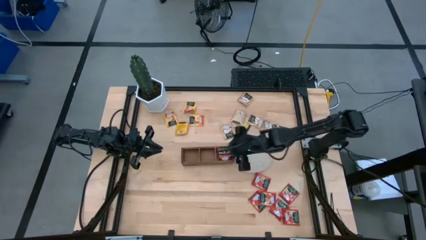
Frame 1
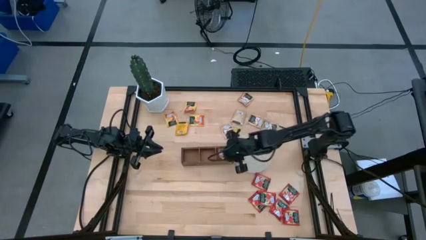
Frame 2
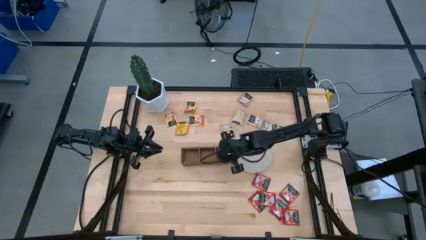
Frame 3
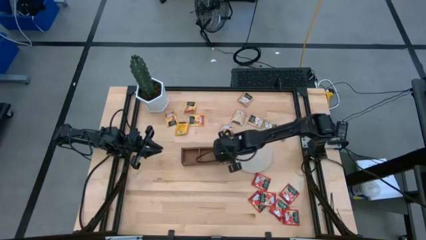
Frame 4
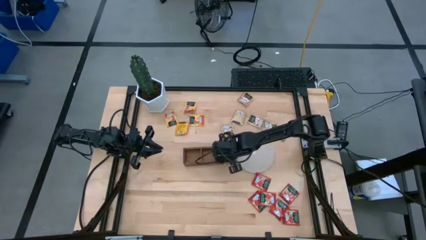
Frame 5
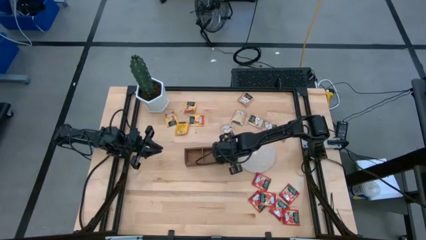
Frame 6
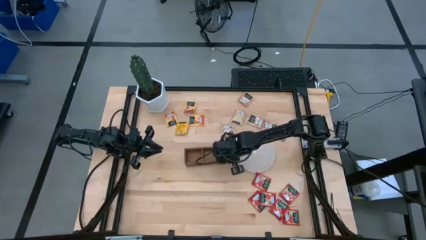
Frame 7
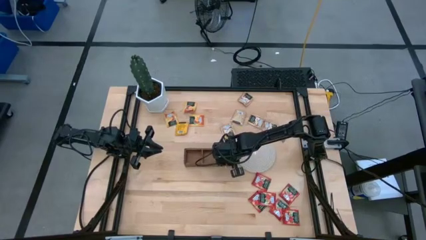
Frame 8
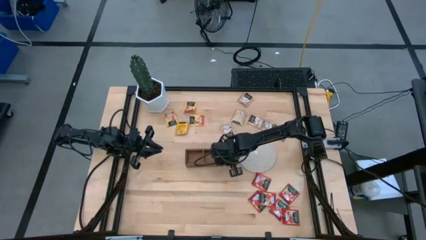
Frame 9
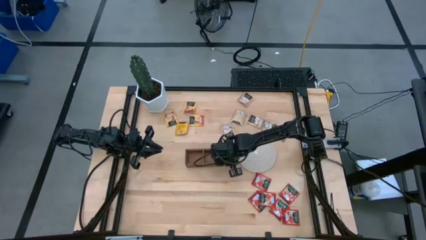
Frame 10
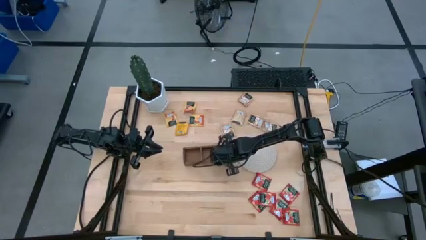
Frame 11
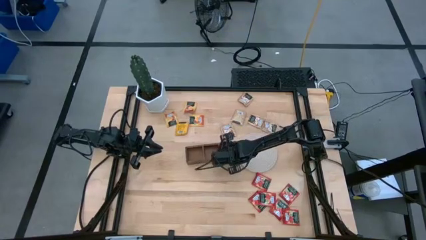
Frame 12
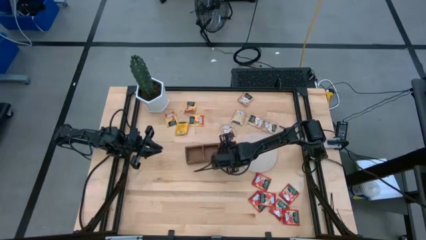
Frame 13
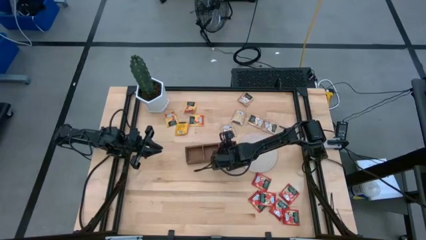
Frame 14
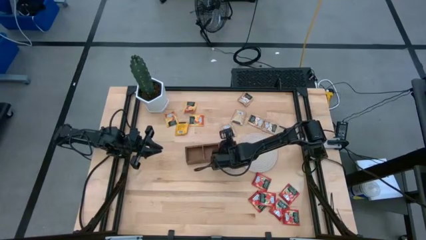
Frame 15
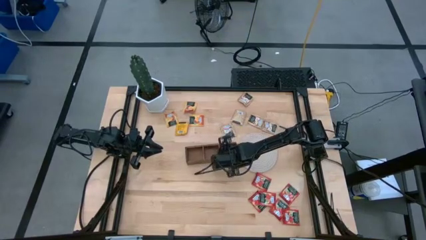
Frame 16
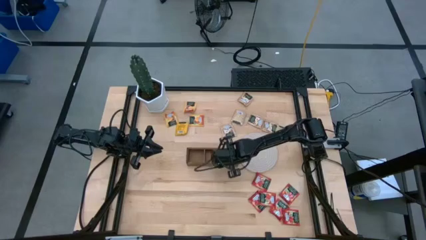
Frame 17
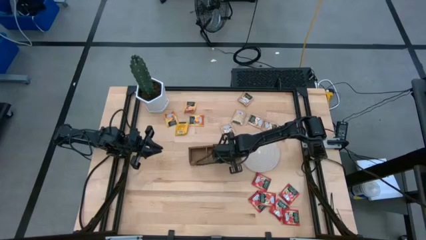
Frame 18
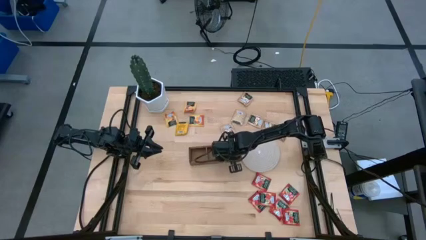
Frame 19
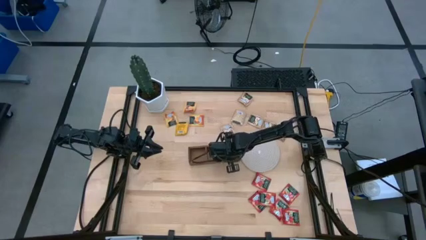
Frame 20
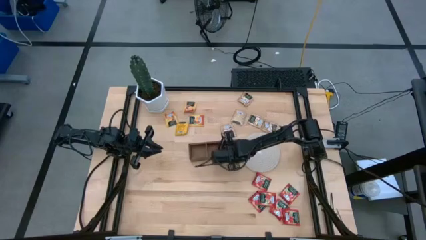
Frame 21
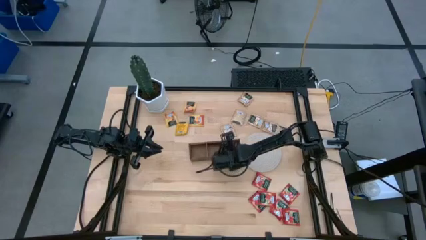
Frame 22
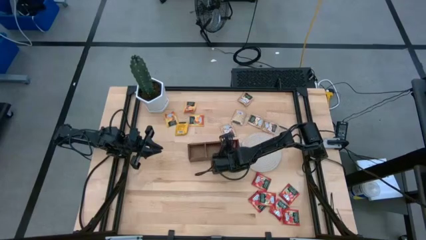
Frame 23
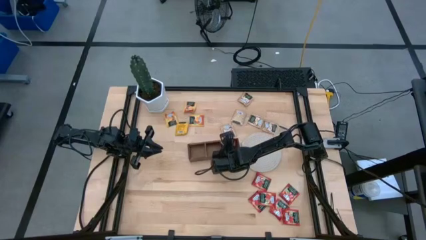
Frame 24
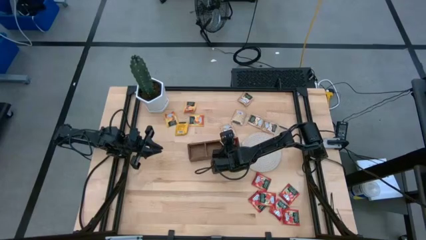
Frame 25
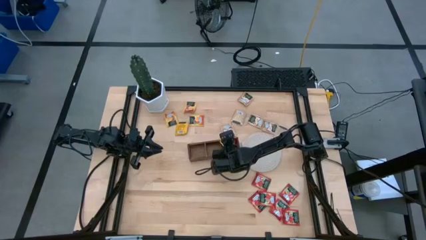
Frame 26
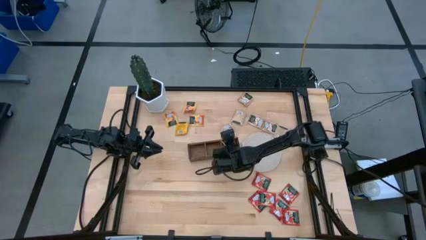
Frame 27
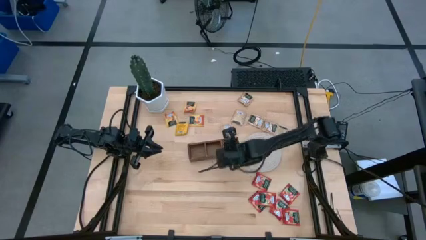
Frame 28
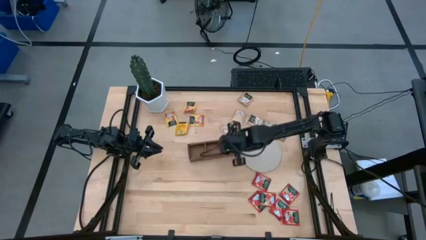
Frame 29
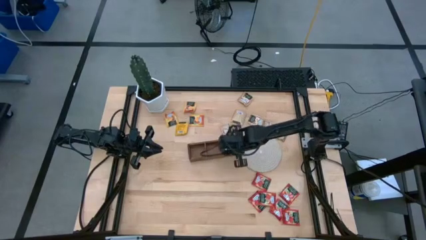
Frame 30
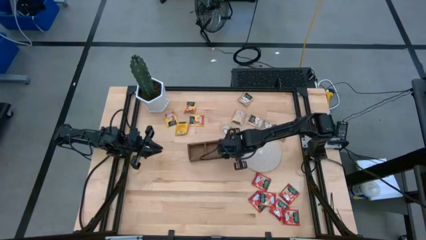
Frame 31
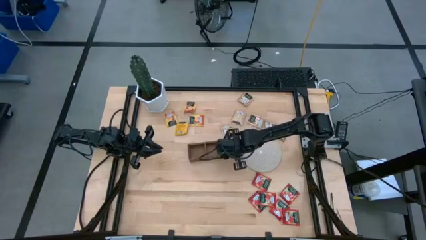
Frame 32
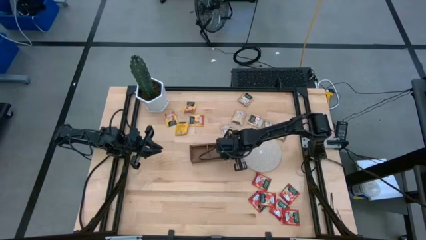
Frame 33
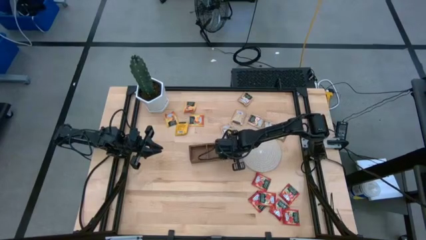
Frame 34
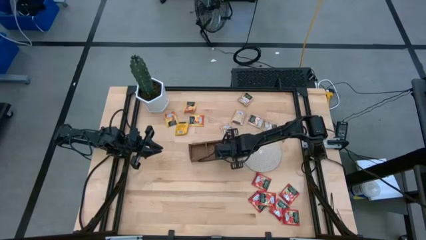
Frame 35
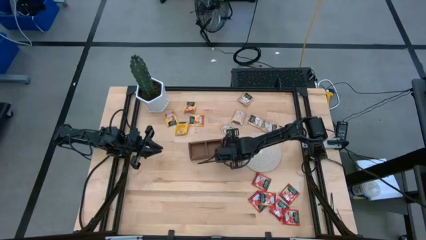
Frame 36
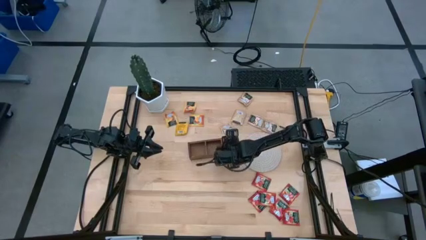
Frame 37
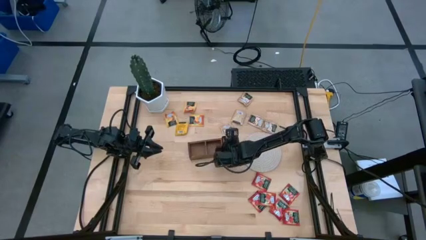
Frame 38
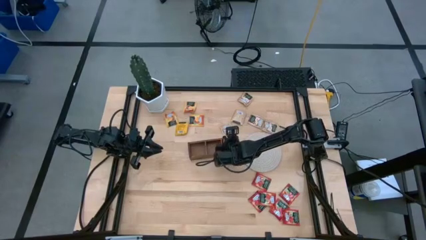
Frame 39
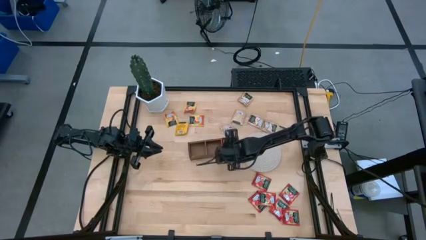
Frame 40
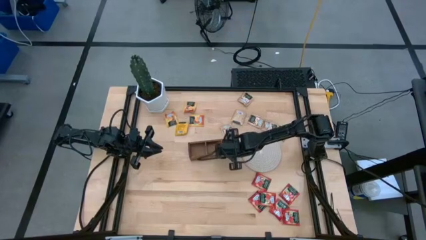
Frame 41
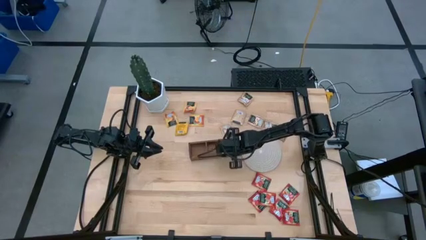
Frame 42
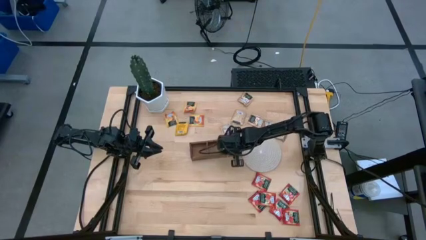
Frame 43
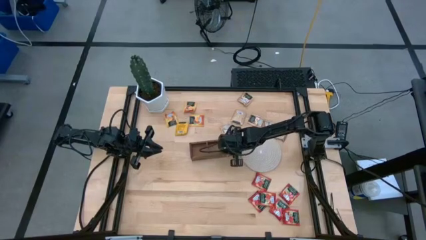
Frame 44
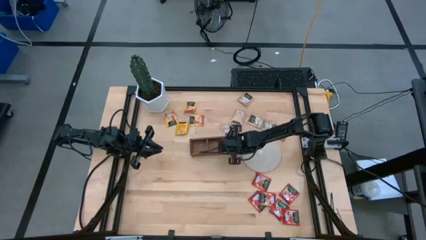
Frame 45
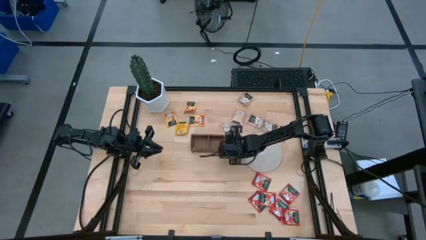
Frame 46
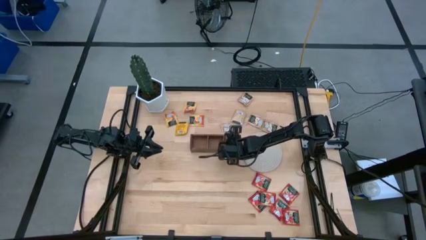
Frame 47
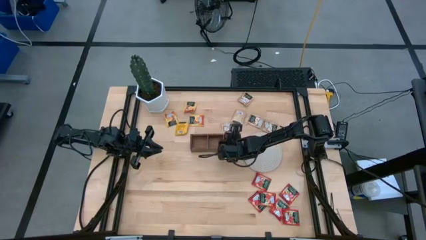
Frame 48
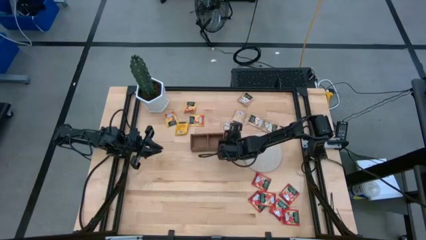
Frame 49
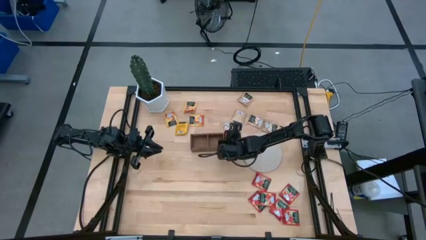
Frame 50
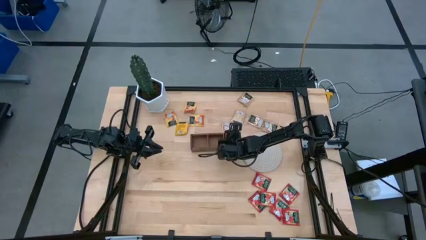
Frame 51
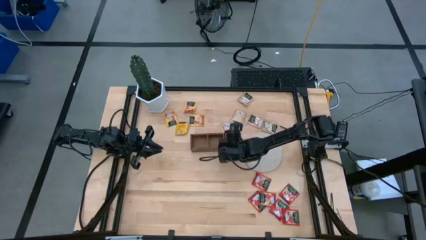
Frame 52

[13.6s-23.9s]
Task: Pick & Place Tea
Put the red tea bag into the right section of the wooden organizer

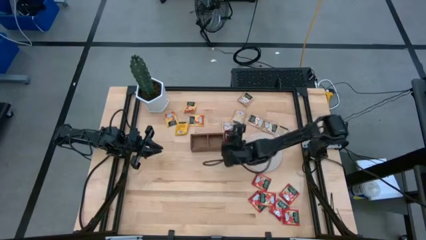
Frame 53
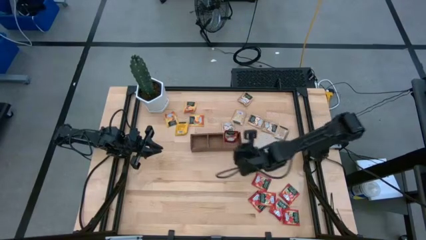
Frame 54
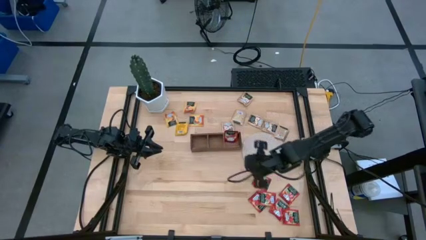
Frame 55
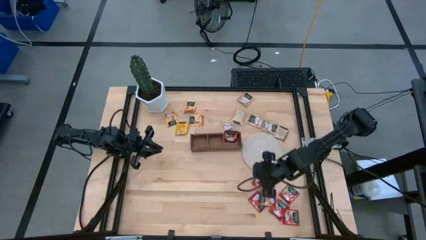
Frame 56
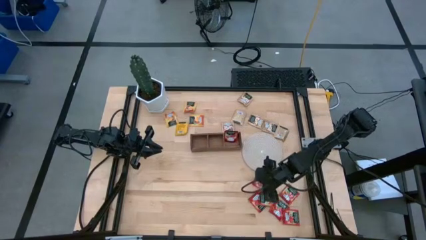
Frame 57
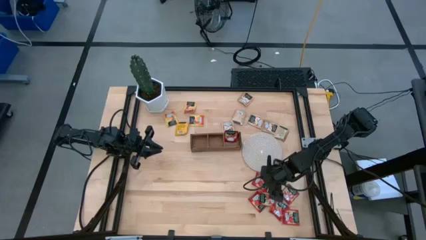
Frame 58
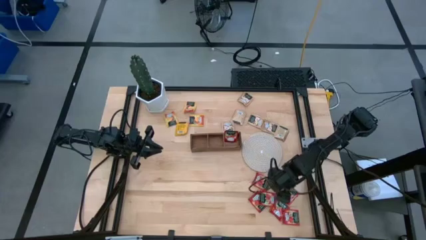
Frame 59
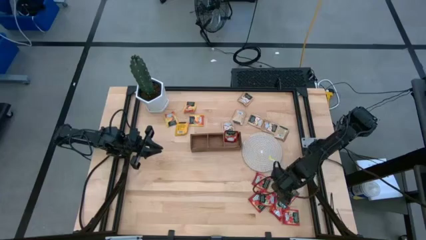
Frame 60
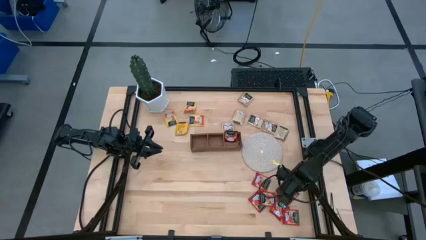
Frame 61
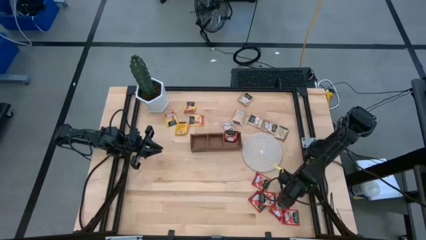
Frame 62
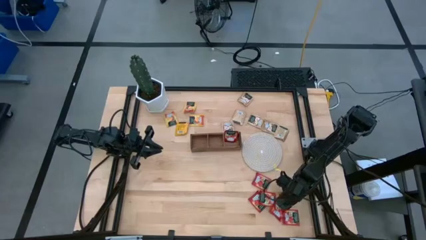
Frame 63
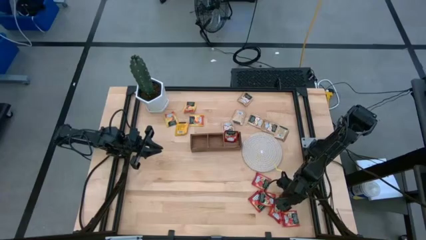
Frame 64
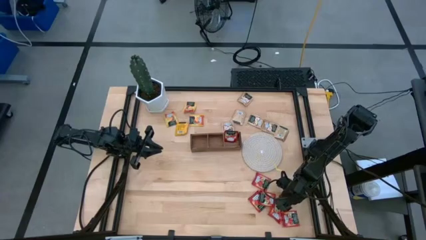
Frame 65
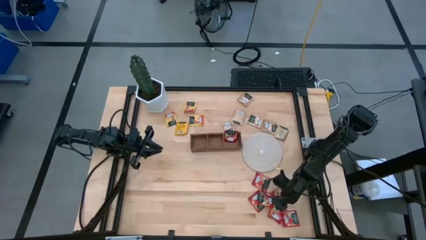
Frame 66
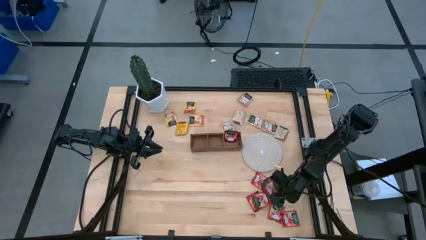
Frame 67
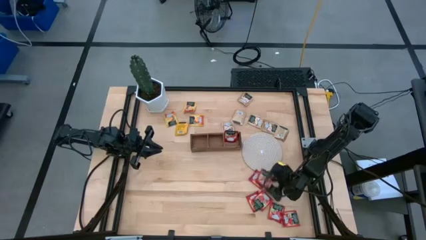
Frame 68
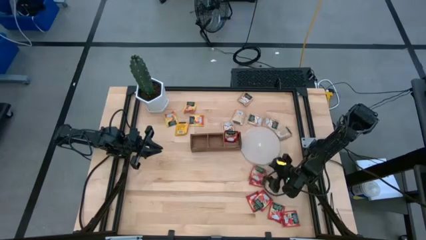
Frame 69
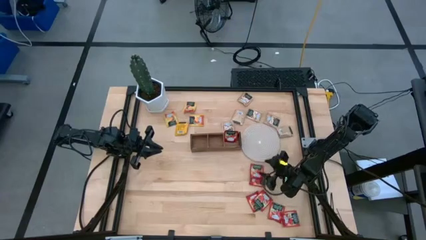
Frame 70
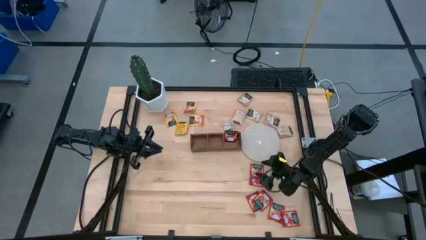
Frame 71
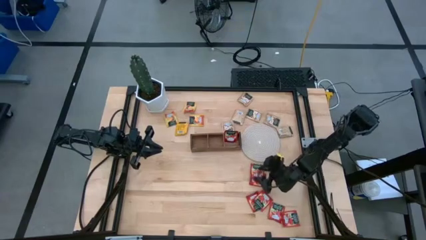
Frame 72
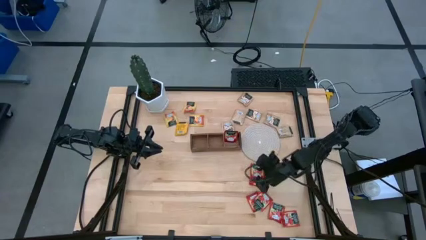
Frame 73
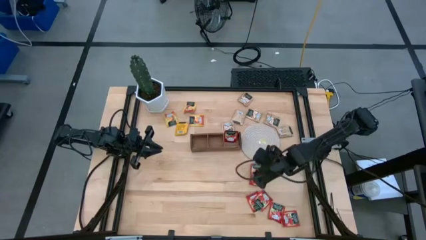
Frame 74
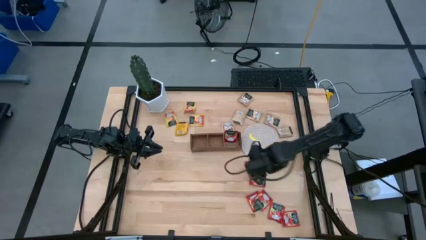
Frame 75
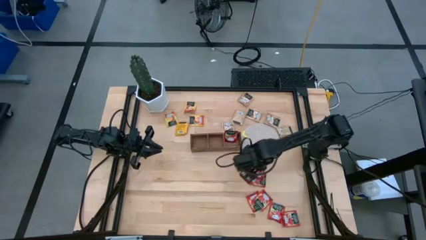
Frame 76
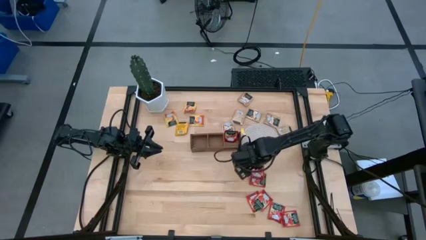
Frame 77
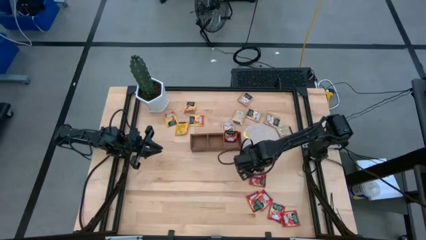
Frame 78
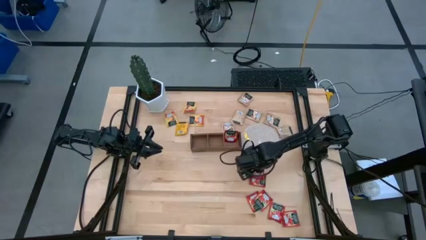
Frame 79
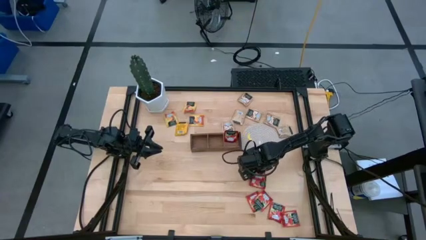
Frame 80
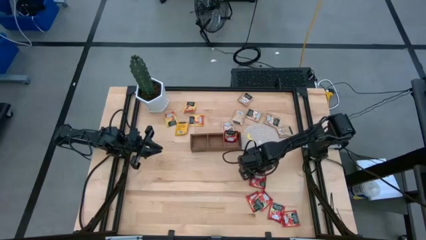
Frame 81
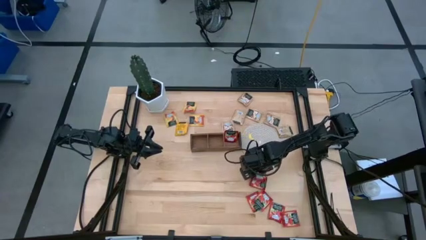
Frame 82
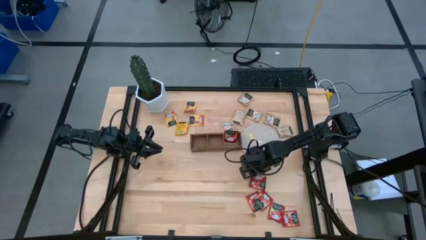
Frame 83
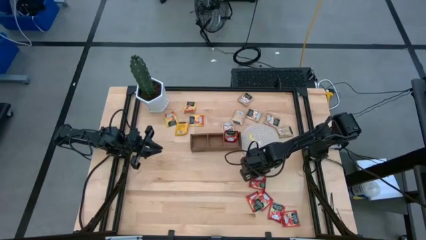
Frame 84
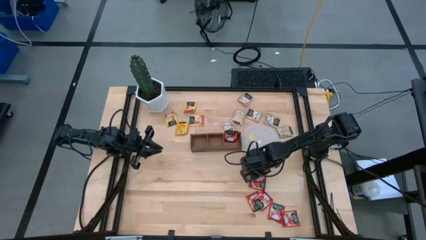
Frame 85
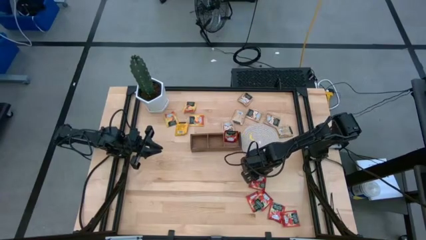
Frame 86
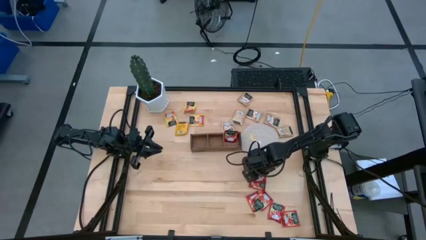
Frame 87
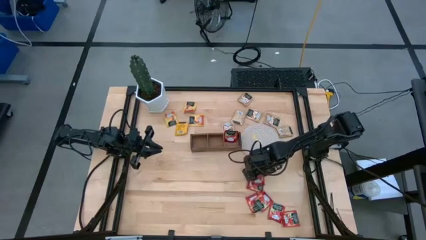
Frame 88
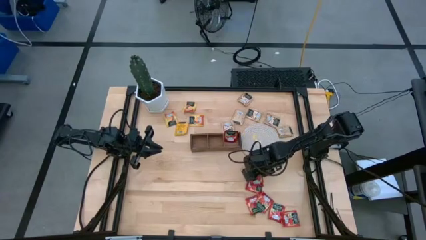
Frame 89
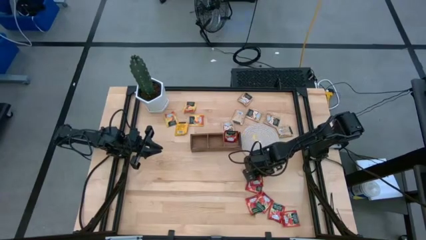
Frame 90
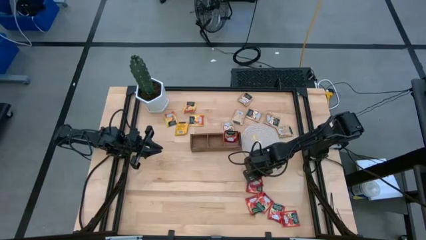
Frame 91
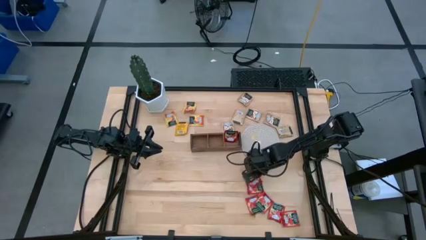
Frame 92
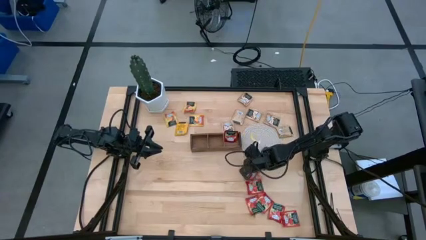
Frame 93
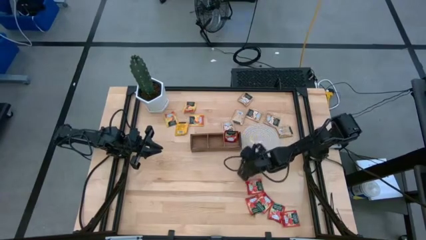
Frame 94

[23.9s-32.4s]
Put the red tea bag into the right section of the wooden organizer
